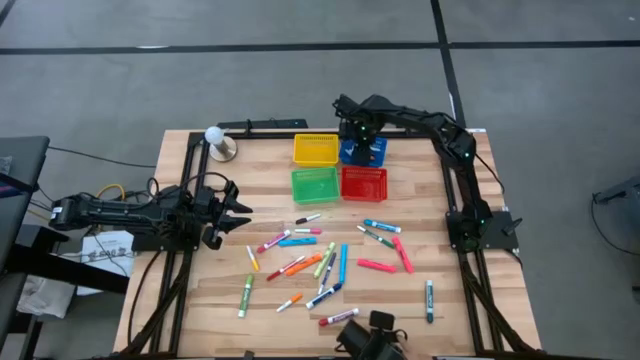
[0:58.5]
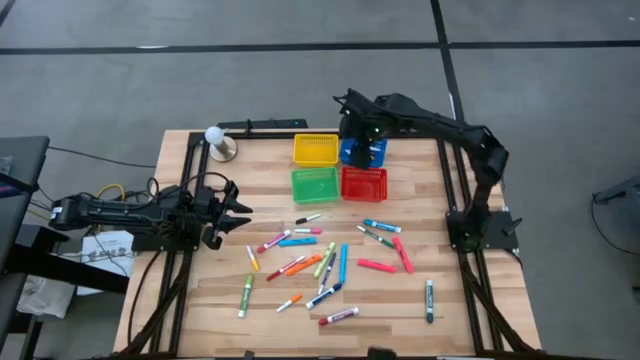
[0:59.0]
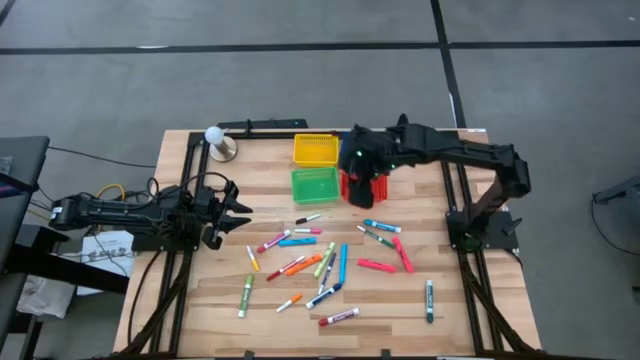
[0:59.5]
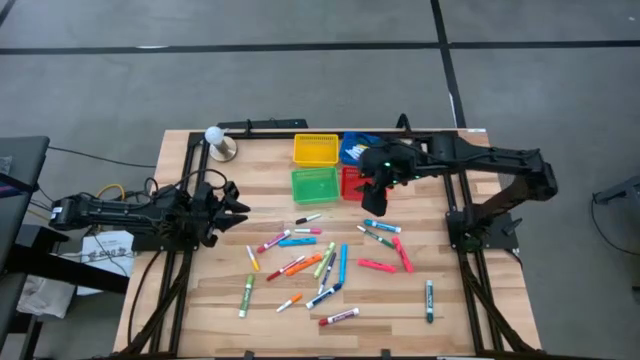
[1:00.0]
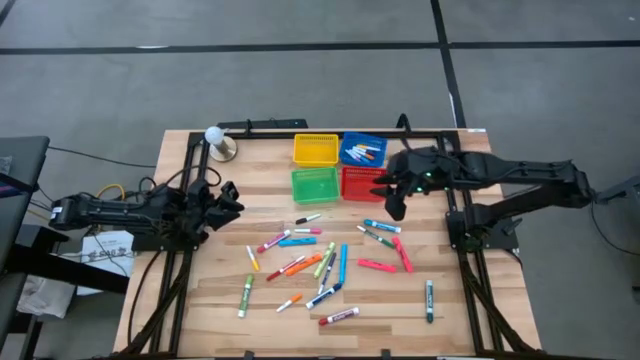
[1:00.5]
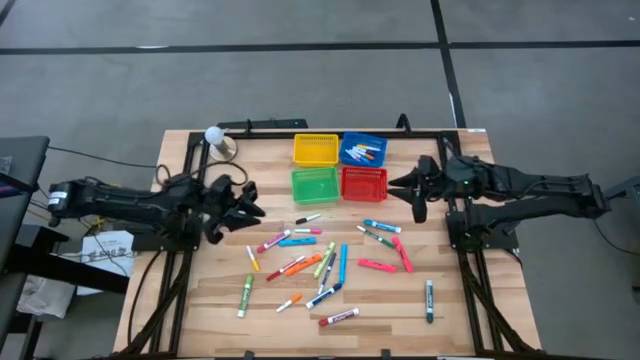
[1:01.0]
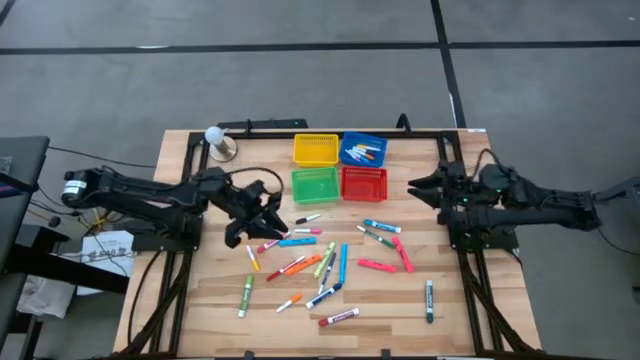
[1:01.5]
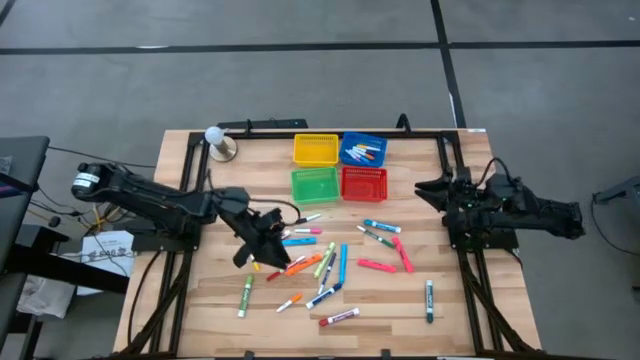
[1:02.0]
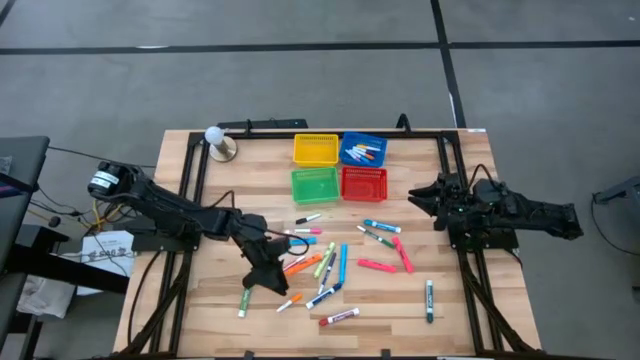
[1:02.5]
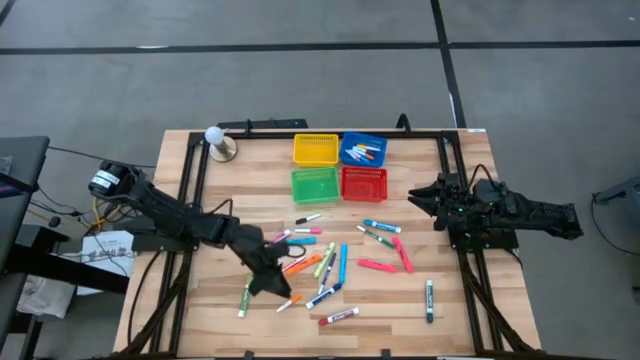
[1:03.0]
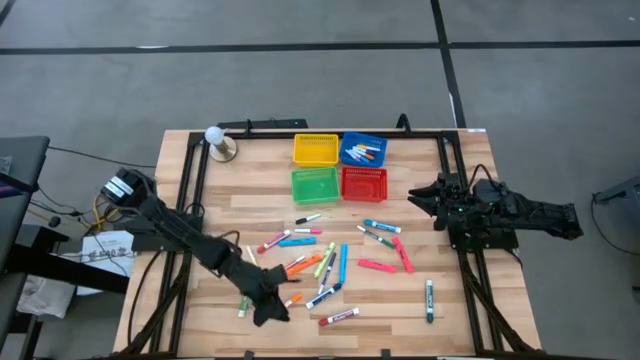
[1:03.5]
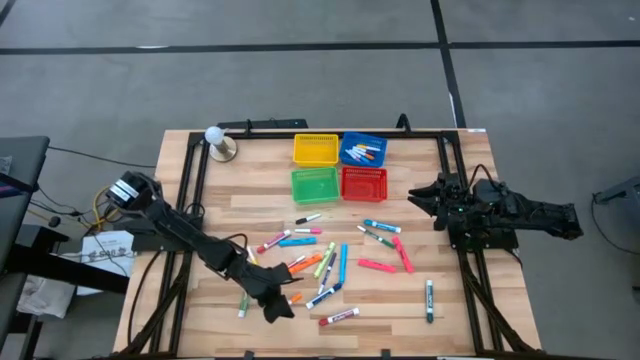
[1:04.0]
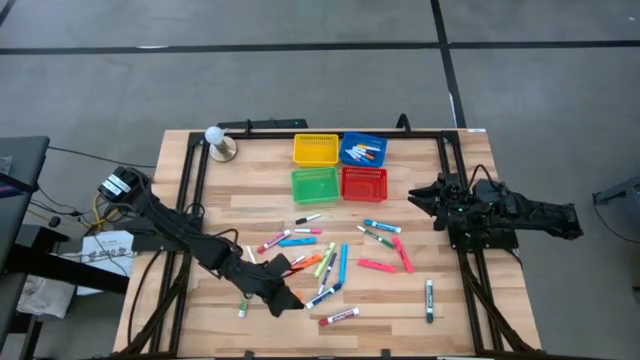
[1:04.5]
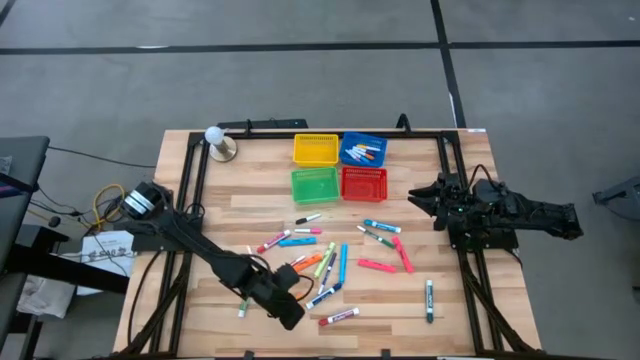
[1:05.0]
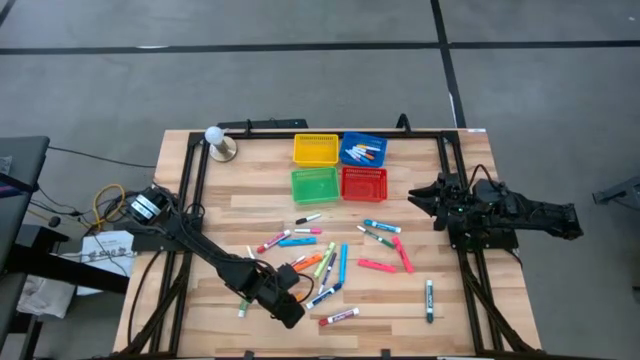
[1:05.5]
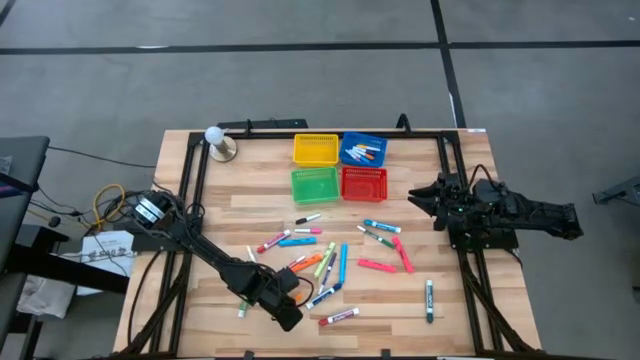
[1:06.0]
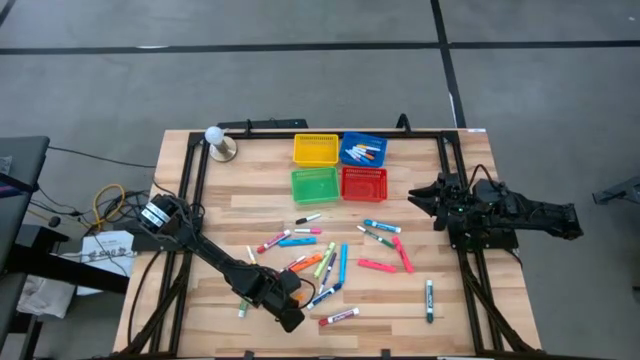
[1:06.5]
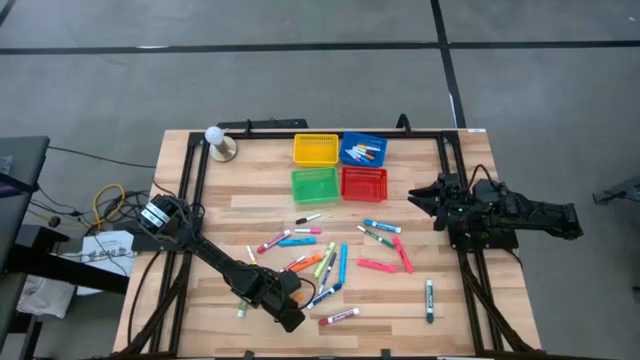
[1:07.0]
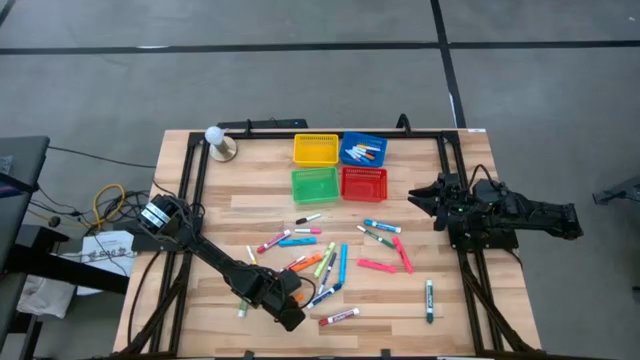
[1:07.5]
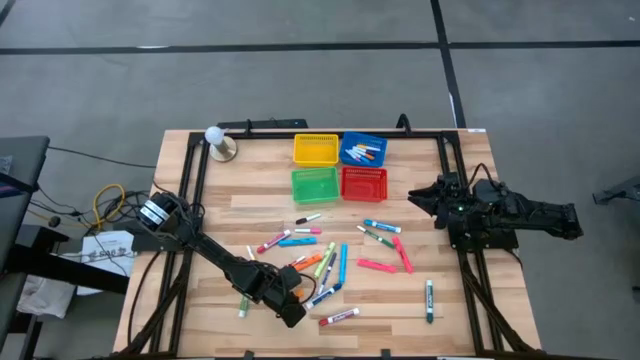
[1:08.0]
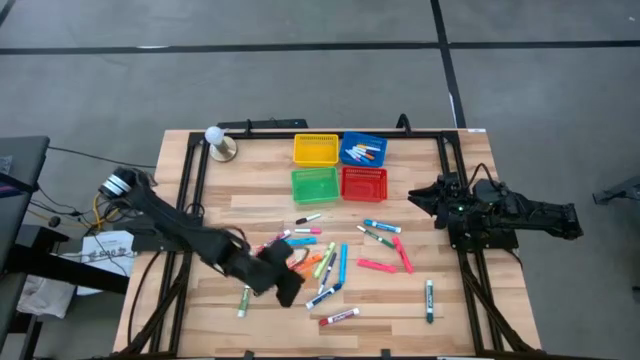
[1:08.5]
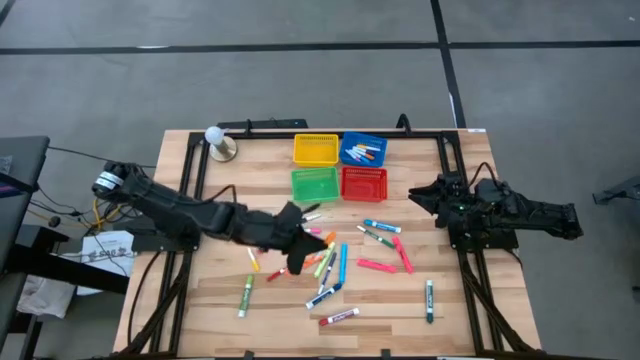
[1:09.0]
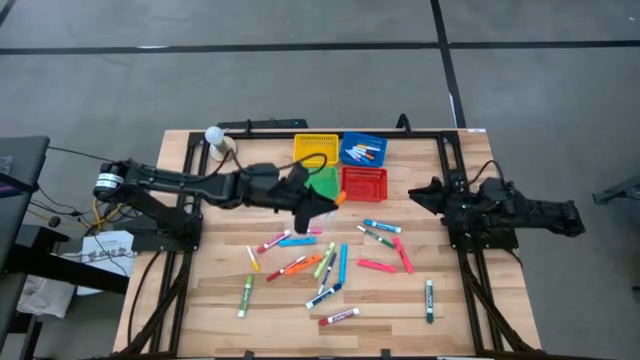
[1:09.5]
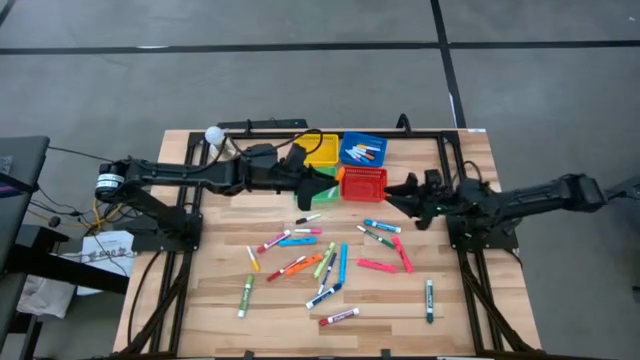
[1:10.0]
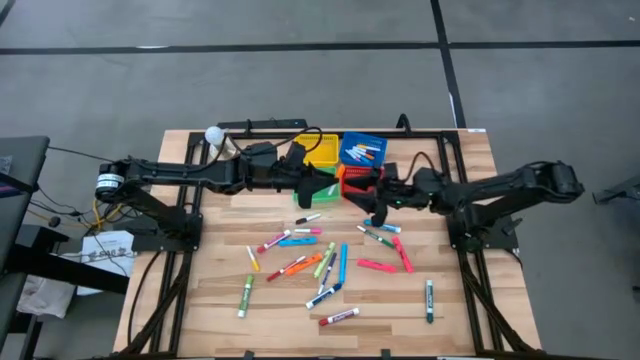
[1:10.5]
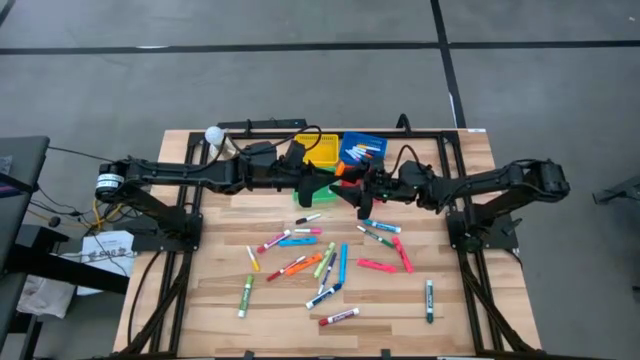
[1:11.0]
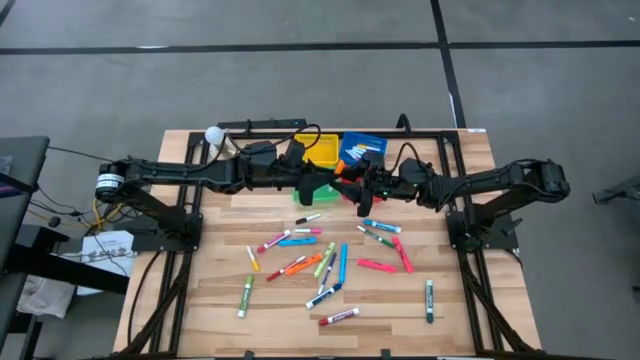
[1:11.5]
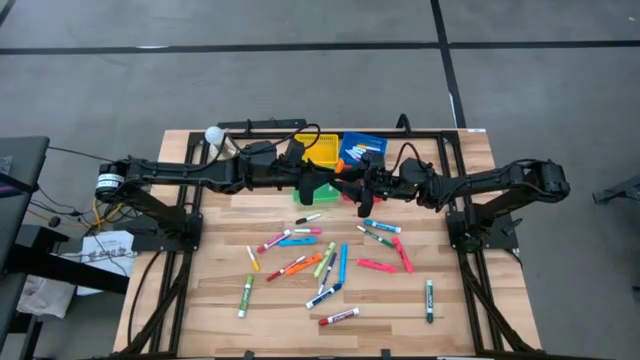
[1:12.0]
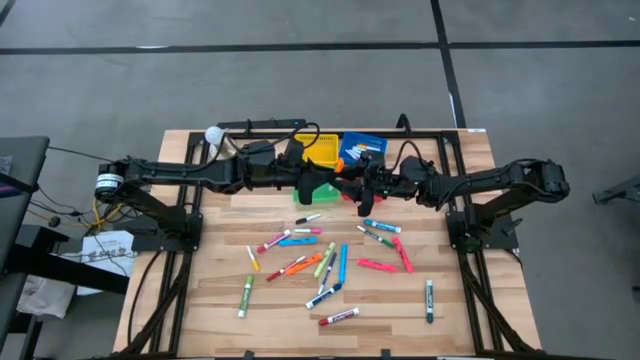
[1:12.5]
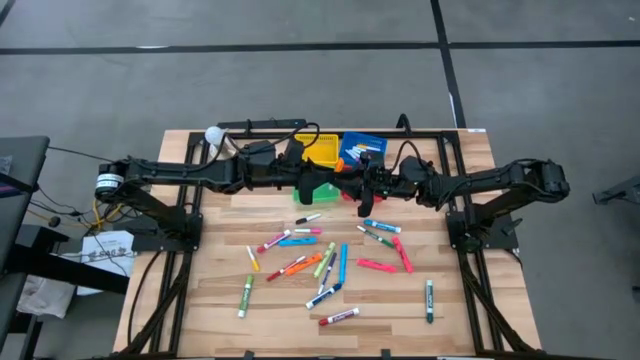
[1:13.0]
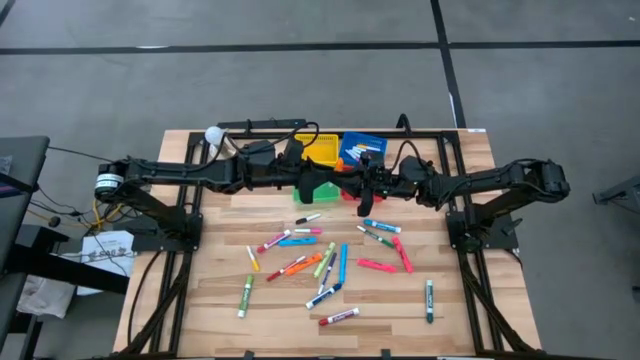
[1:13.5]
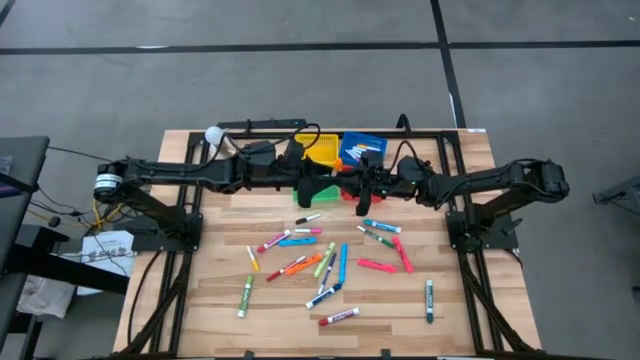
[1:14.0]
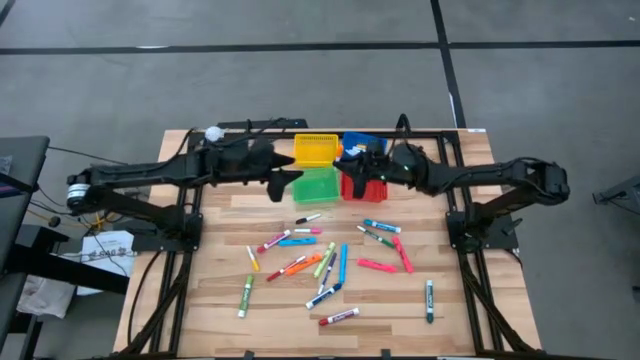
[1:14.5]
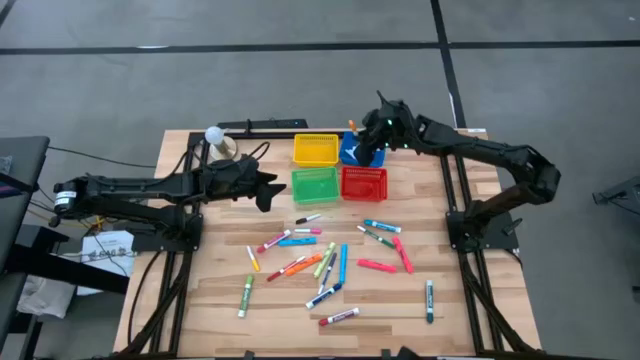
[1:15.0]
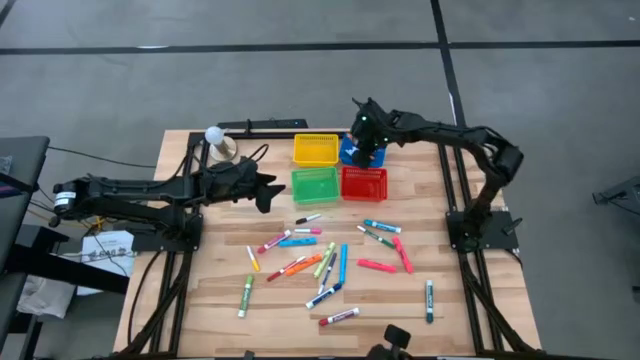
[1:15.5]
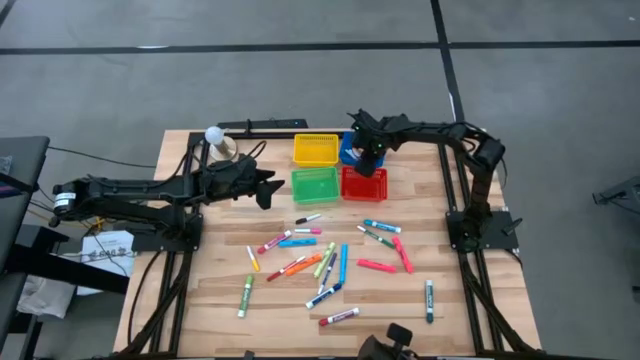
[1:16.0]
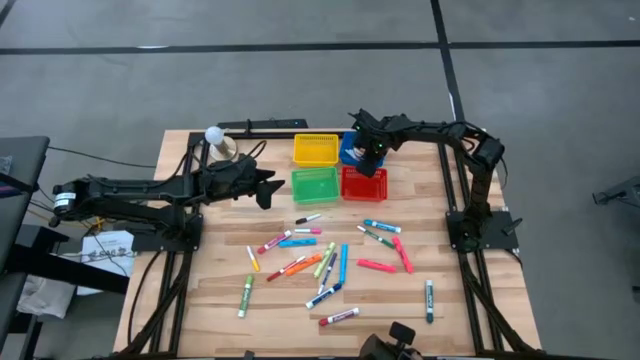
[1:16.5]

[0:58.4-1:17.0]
Task: Pick & Place Markers
Put the orange mini marker into the blue bin

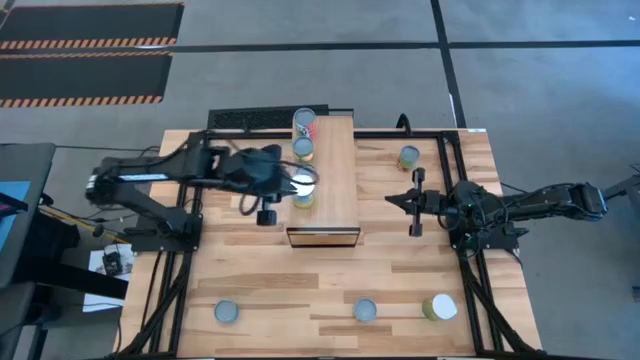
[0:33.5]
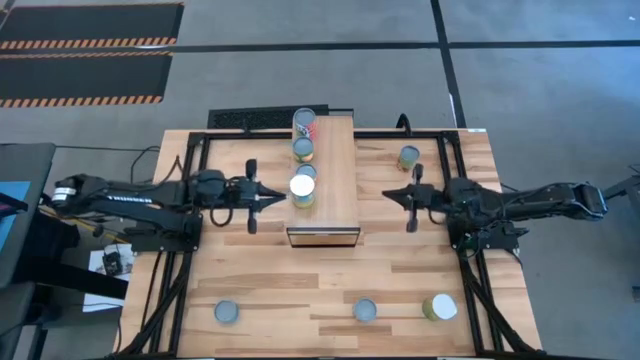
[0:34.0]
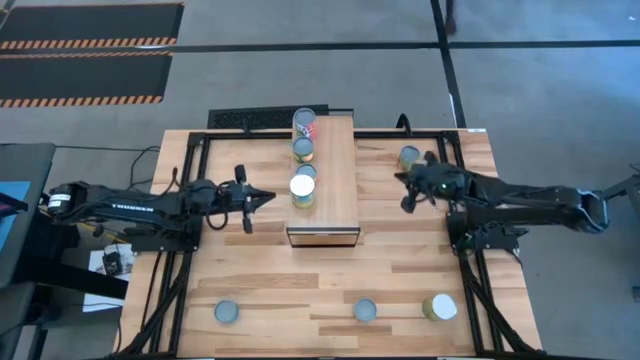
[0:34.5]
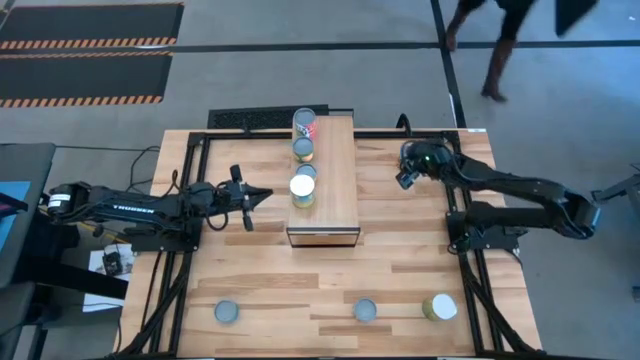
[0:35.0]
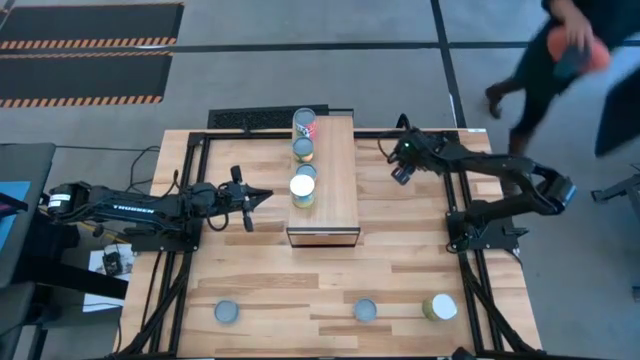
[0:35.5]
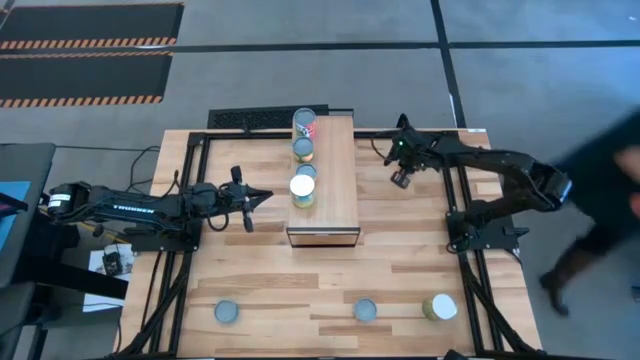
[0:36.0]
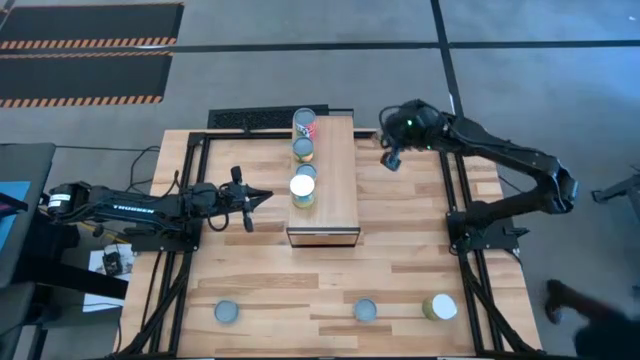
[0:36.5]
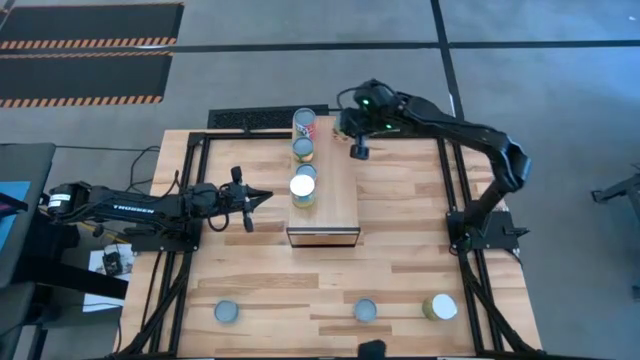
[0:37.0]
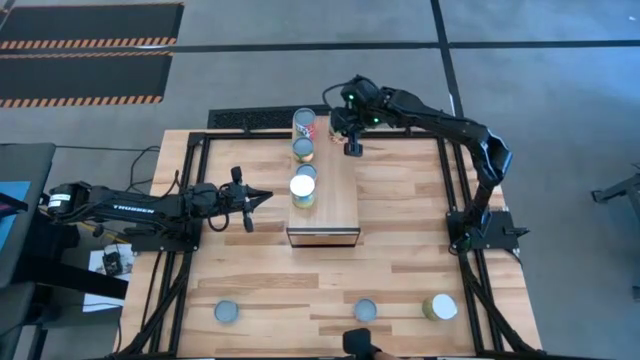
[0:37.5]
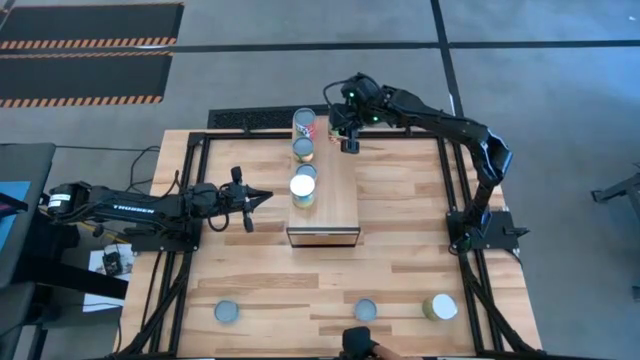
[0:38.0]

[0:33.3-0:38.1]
Task: Pick and place cans onto a shelf
Put the canned spaghetti sauce on the shelf aligned with other cans
